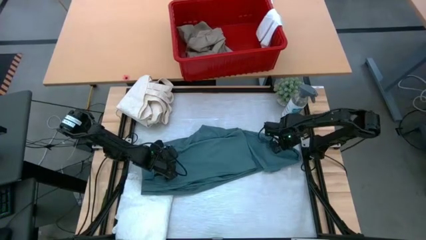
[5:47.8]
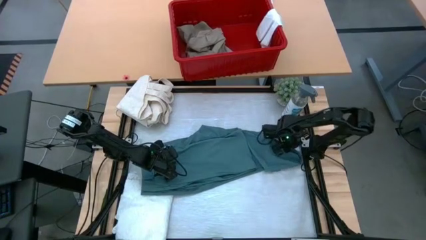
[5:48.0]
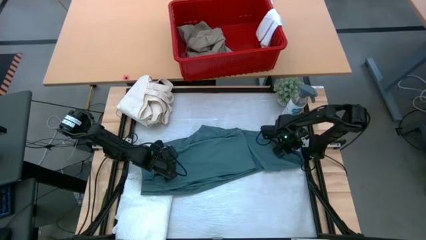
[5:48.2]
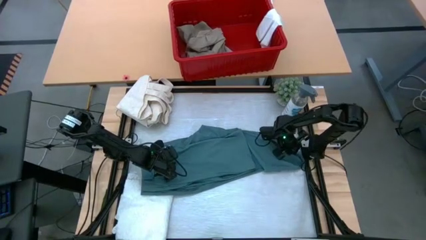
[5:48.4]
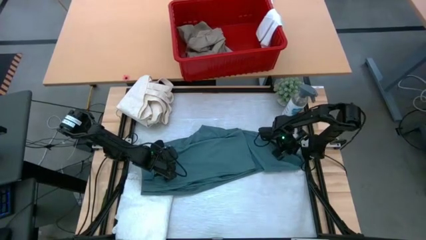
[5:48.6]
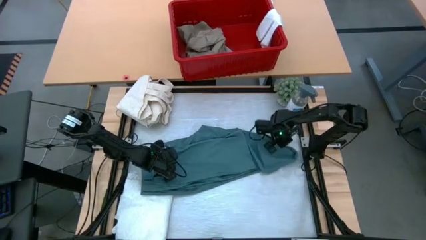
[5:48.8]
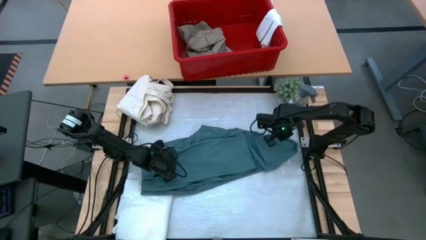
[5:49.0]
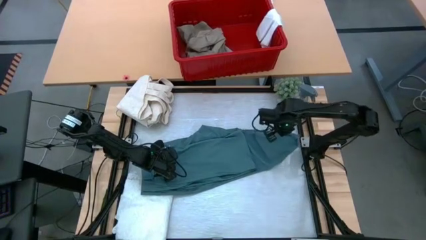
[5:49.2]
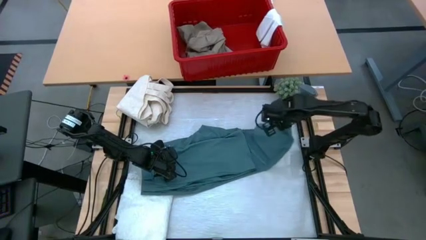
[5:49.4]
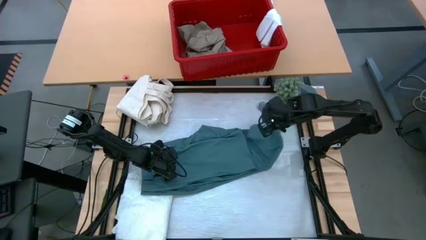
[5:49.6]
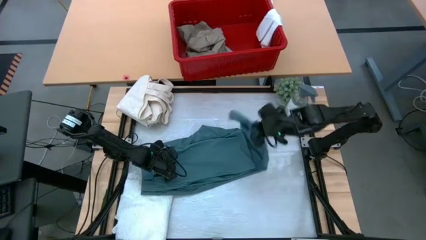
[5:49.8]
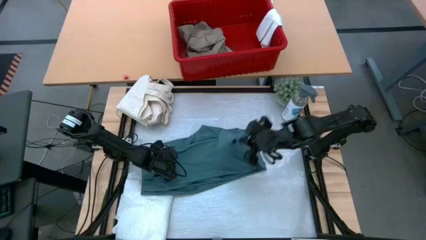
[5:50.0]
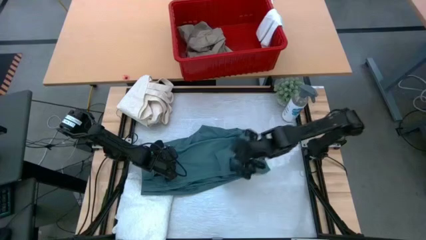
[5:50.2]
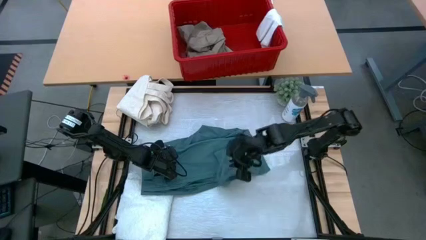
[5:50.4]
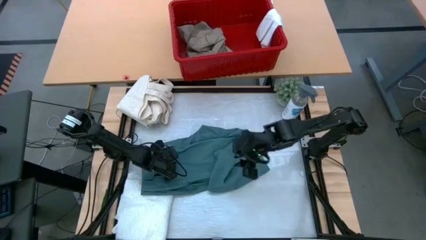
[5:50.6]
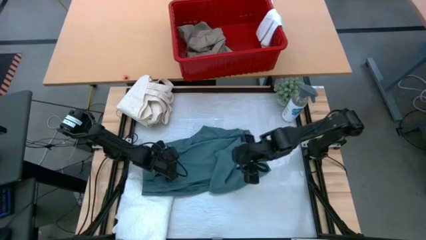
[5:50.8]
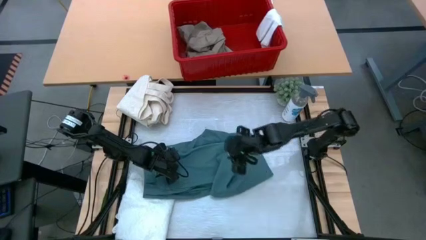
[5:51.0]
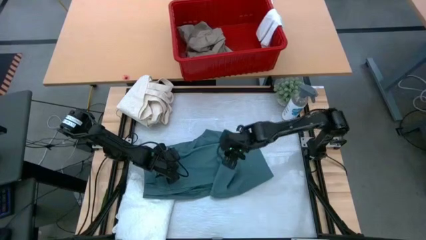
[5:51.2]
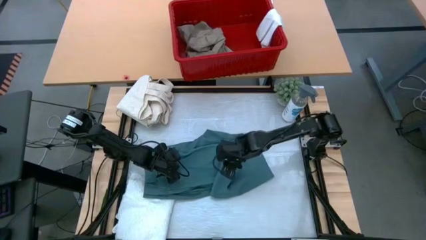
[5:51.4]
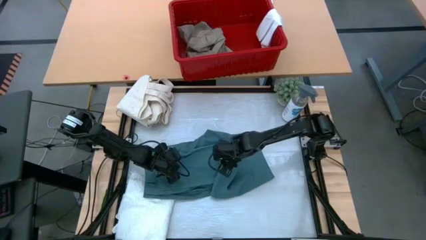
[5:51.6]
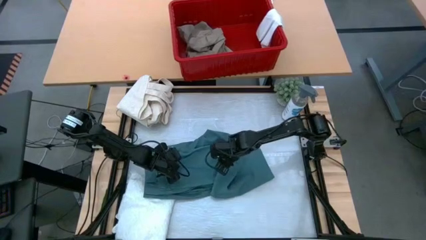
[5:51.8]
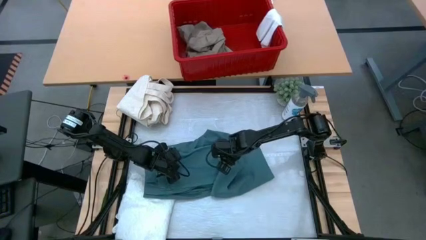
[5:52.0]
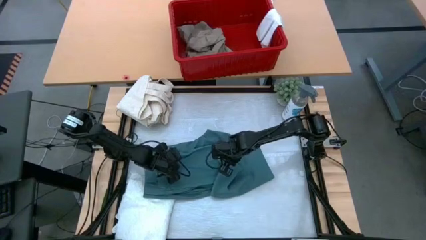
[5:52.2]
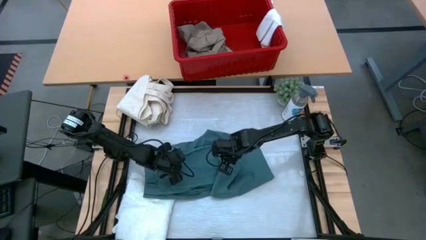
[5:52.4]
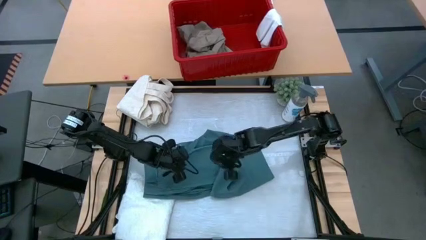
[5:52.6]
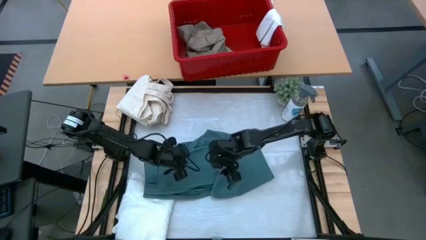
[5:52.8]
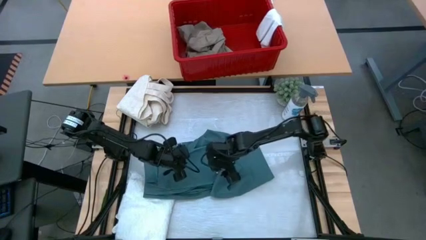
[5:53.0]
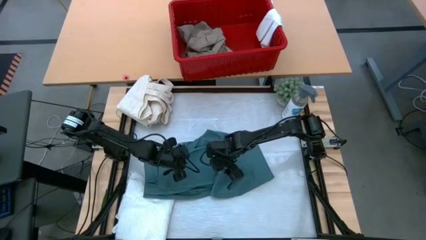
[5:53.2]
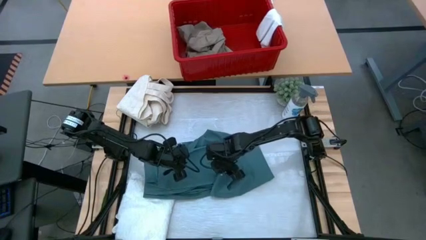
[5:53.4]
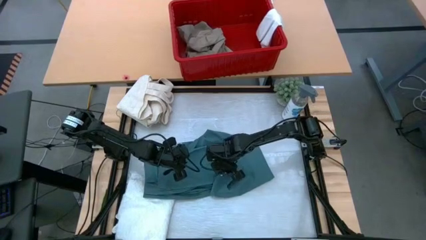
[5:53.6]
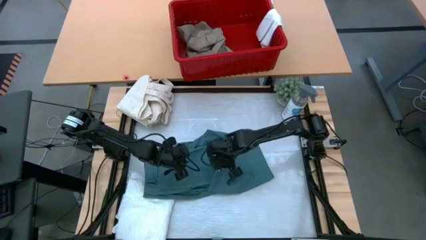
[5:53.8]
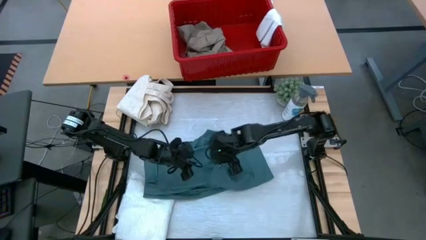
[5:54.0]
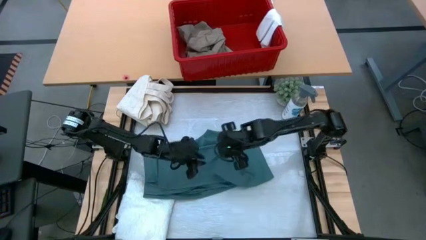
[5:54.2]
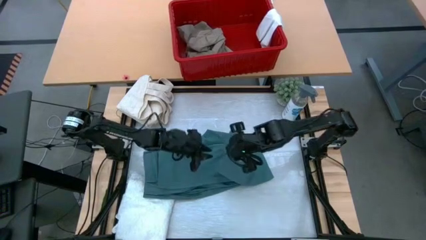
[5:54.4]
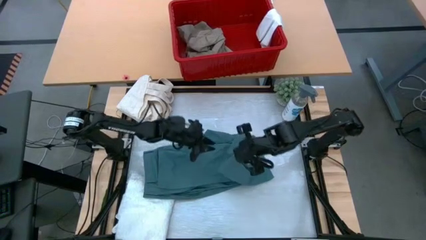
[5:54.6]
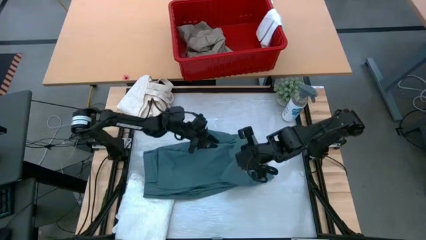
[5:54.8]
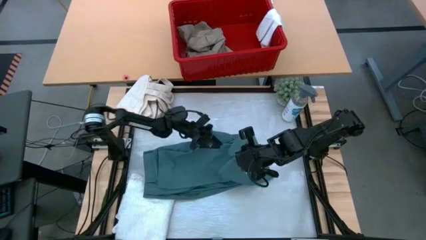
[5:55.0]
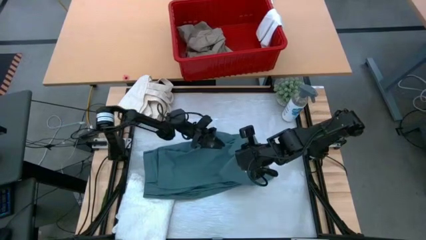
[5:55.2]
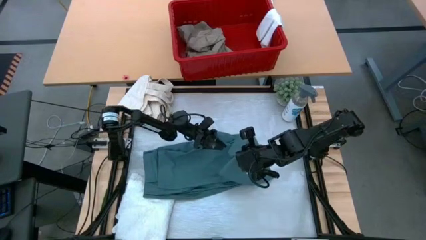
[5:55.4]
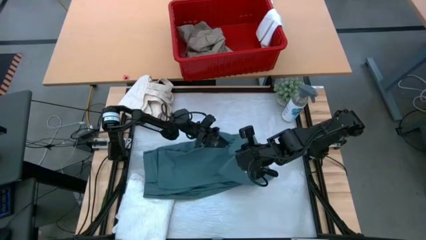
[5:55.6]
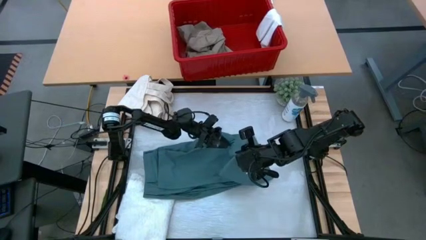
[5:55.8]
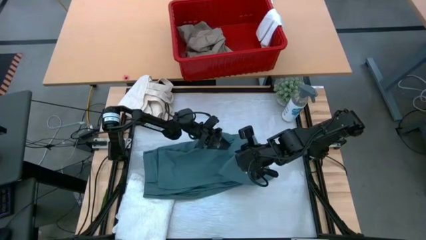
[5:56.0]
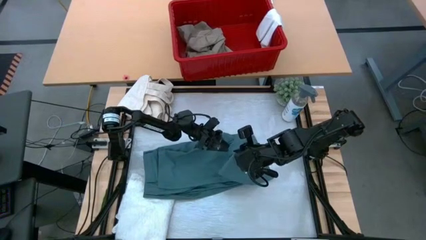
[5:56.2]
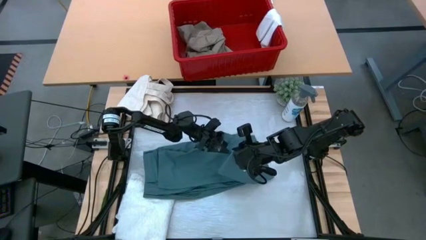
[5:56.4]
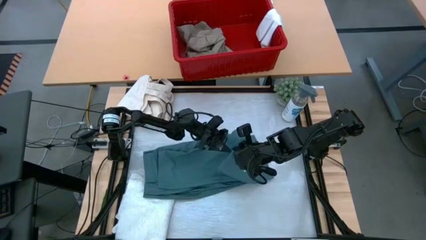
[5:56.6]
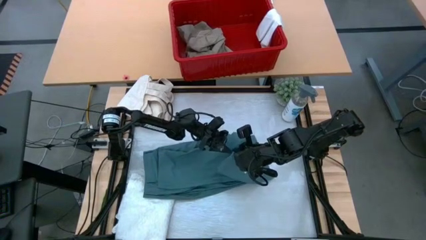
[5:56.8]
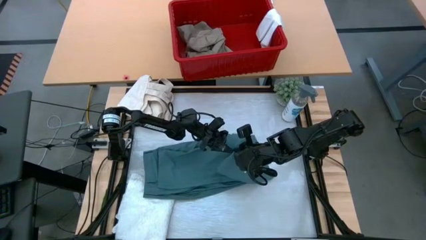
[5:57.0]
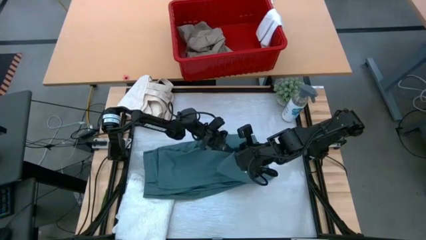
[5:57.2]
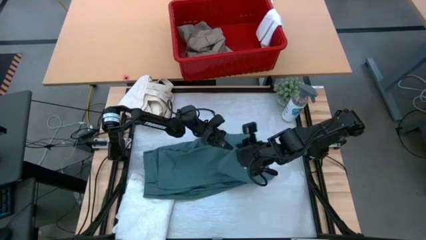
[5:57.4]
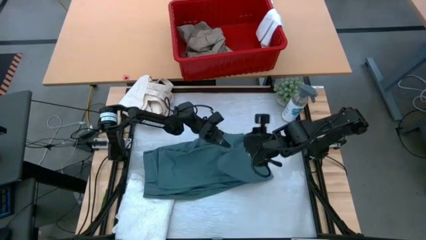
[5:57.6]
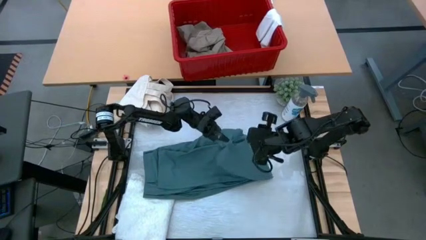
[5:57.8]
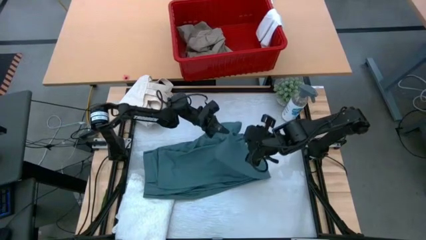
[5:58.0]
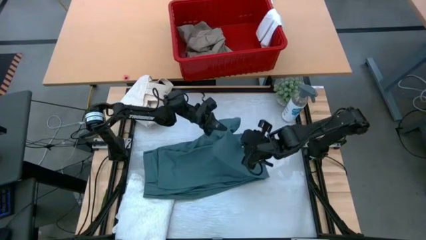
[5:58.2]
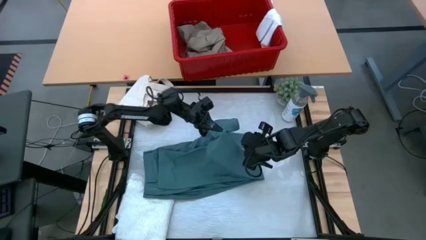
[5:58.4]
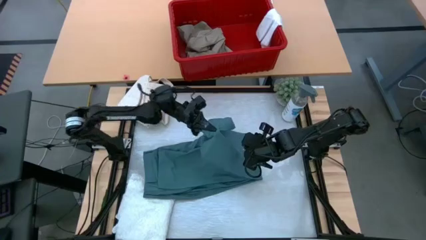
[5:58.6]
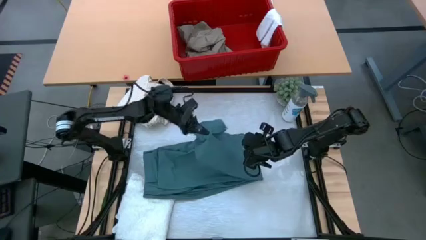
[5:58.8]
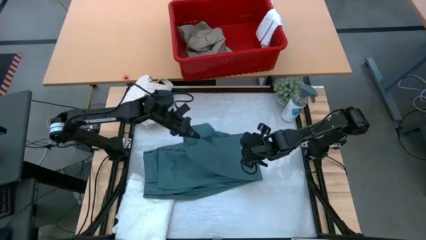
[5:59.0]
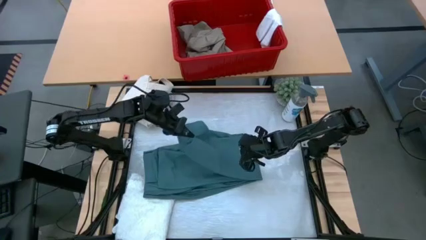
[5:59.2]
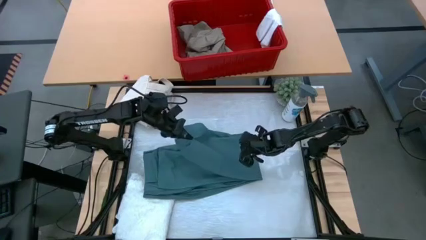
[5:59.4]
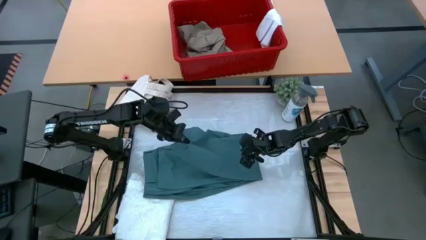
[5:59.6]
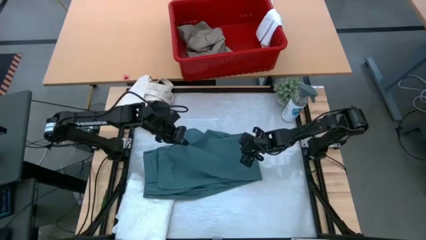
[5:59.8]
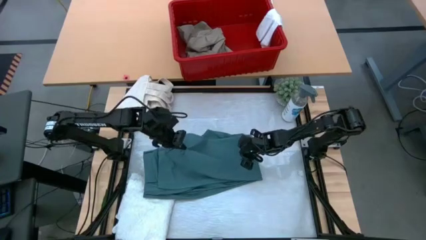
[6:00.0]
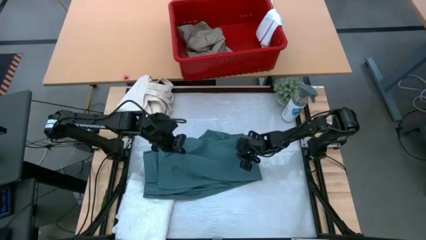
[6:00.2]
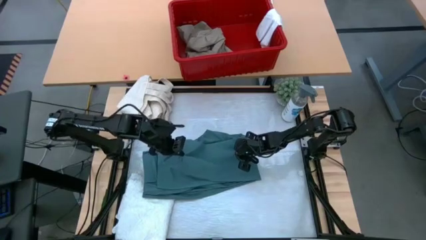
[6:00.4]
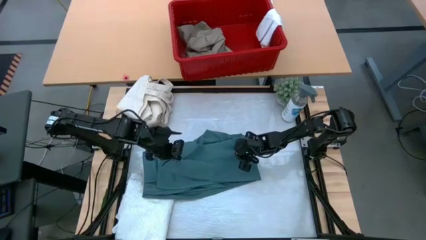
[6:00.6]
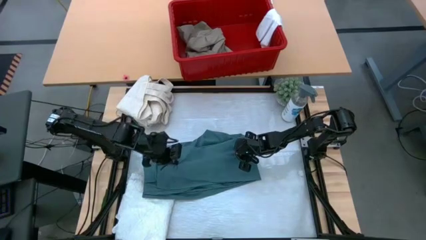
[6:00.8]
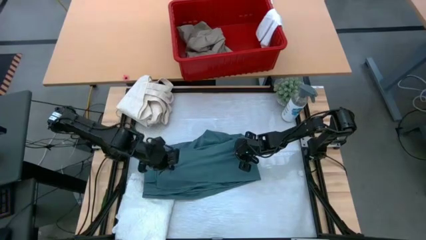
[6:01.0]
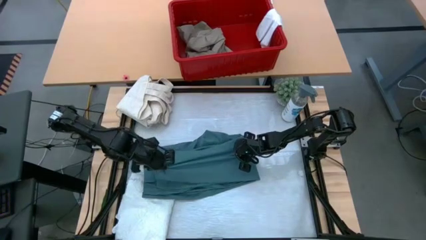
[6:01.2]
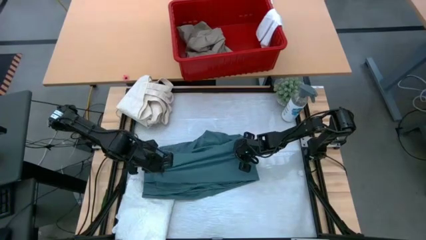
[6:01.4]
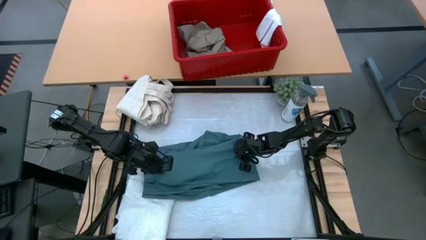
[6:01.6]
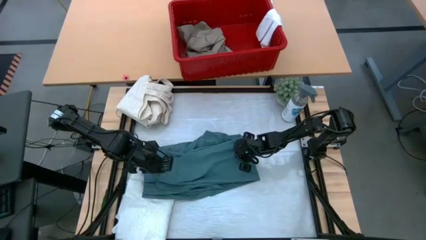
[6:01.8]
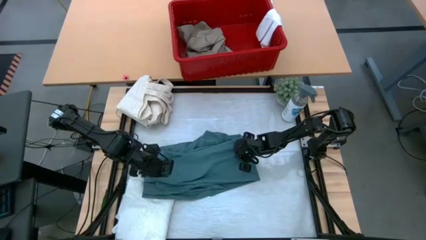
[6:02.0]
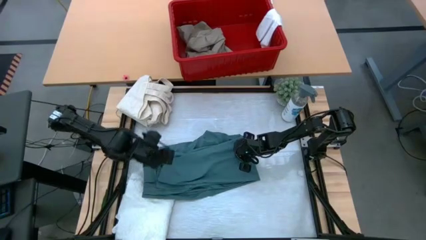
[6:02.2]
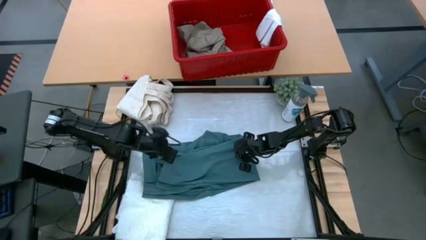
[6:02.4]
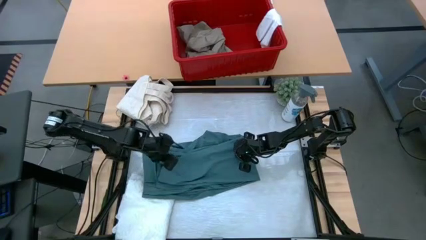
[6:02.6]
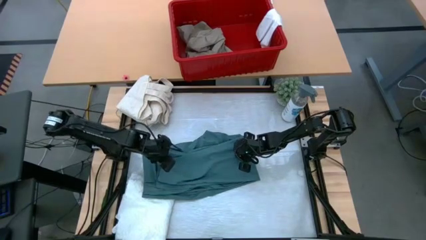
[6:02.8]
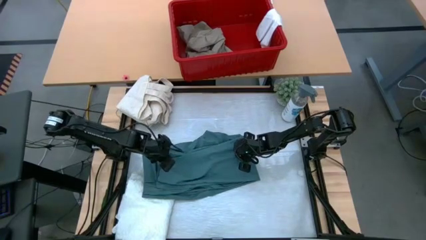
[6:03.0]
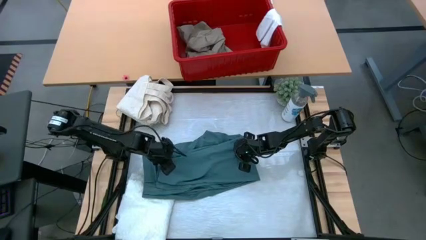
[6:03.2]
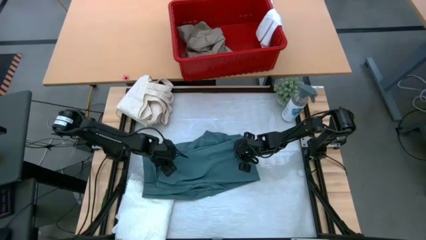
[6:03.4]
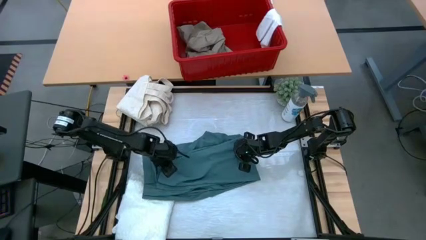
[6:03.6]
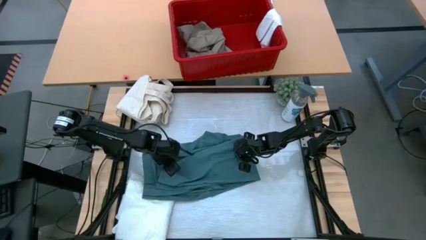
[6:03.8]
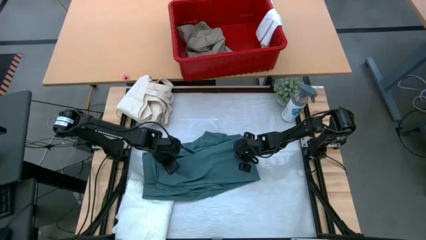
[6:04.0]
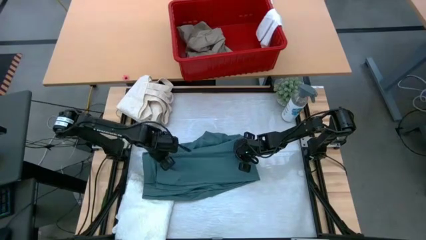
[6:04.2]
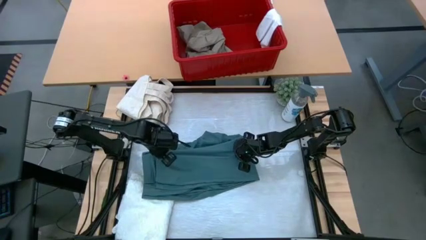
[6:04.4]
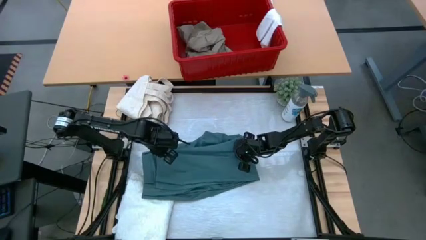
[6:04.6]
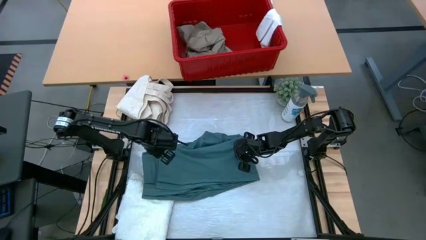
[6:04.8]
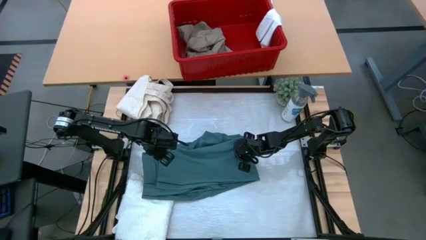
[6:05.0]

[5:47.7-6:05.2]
Task: Fold Laundry from Bin
Fold the blue pants
